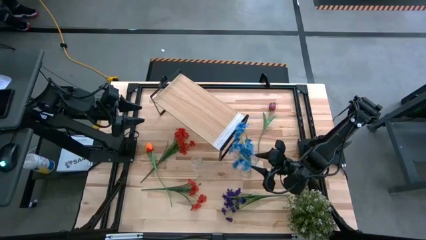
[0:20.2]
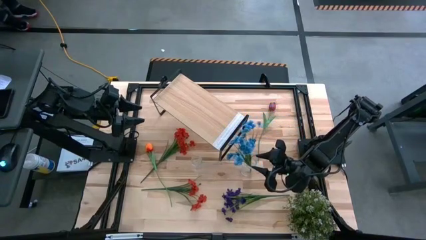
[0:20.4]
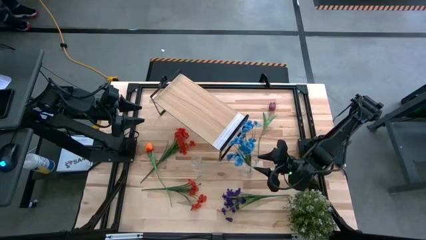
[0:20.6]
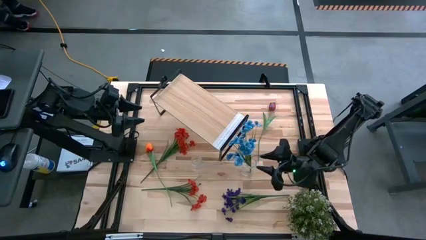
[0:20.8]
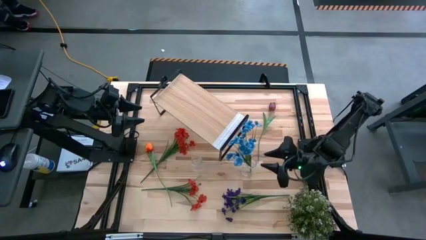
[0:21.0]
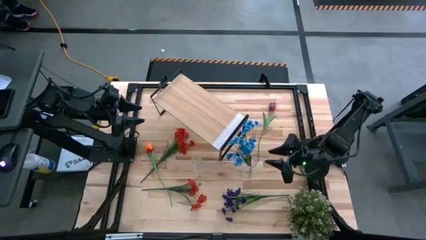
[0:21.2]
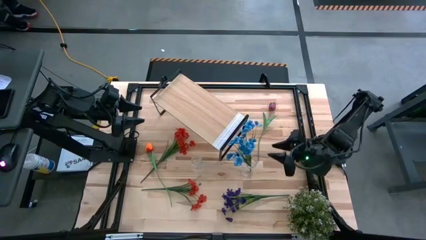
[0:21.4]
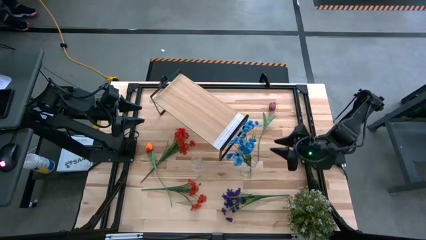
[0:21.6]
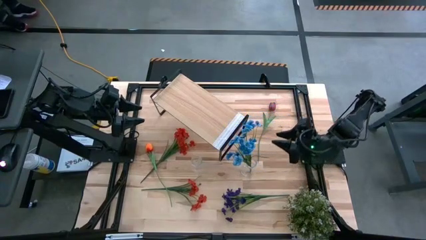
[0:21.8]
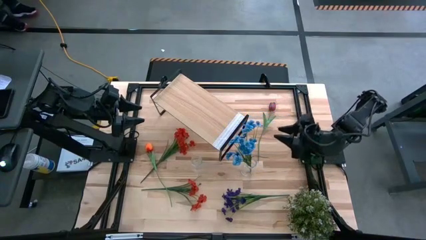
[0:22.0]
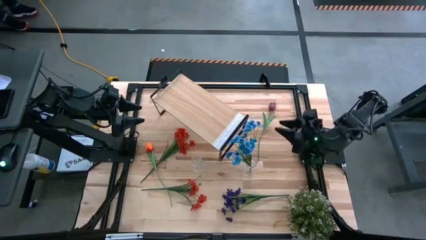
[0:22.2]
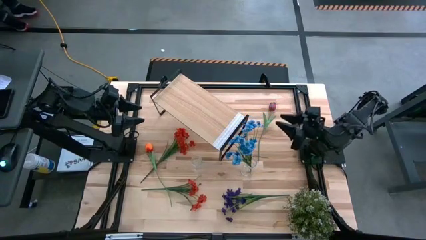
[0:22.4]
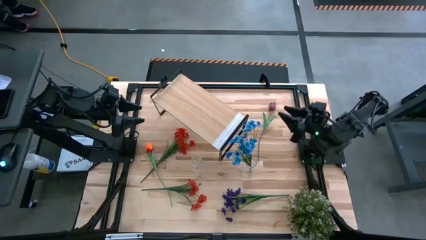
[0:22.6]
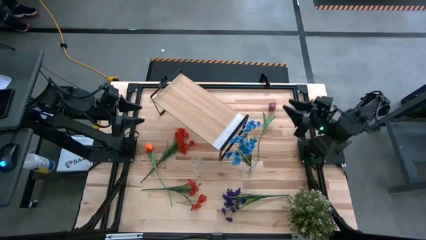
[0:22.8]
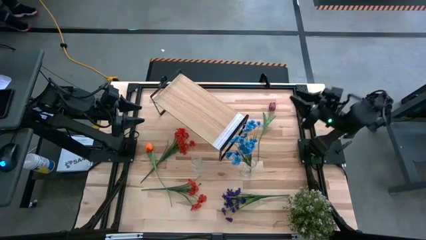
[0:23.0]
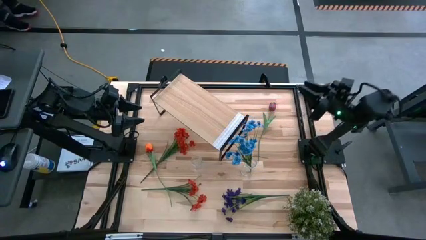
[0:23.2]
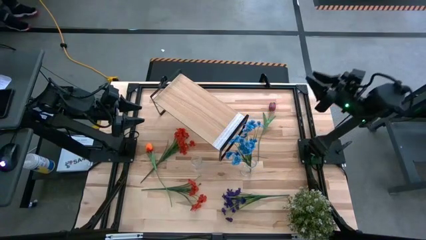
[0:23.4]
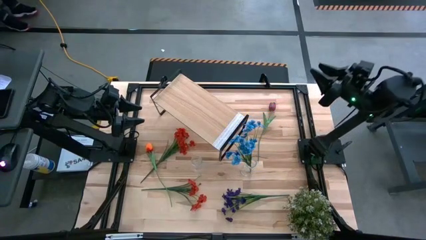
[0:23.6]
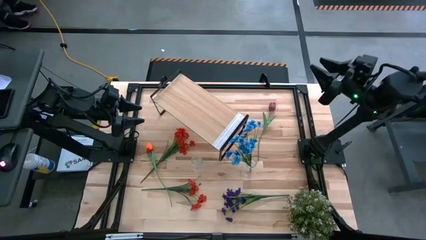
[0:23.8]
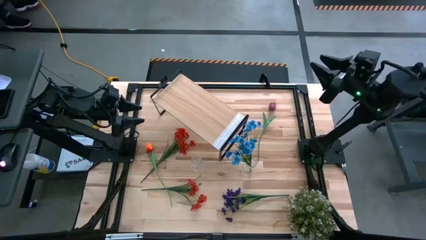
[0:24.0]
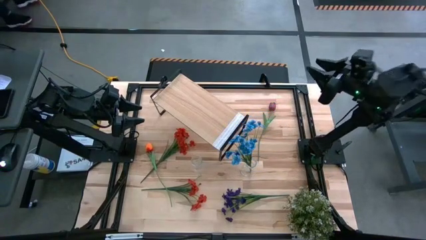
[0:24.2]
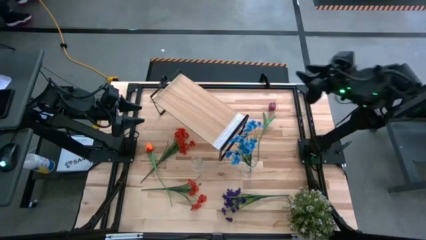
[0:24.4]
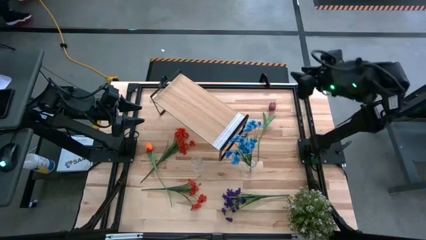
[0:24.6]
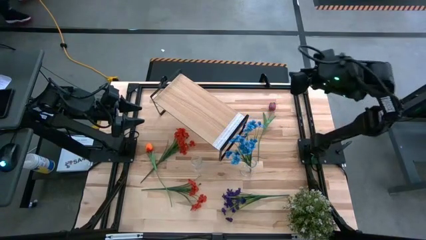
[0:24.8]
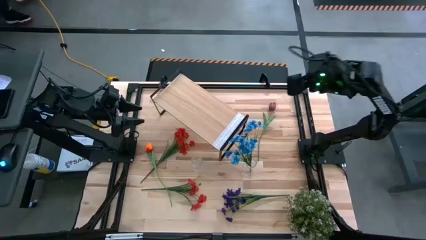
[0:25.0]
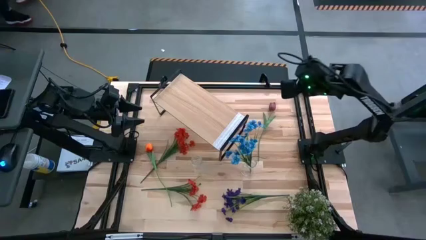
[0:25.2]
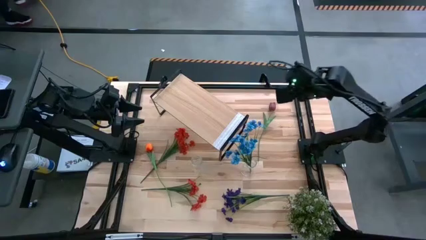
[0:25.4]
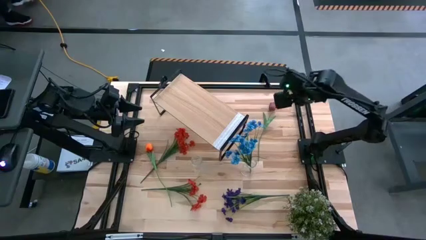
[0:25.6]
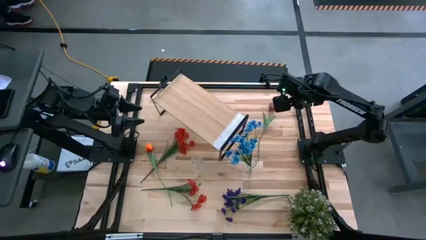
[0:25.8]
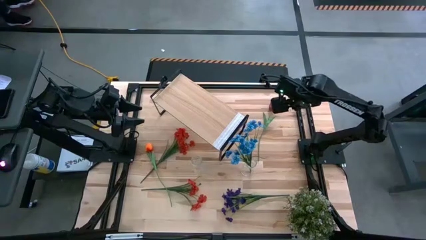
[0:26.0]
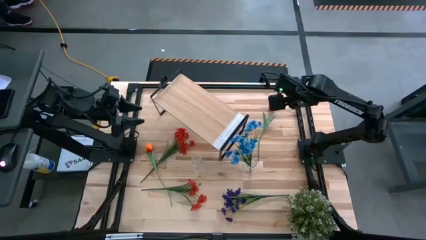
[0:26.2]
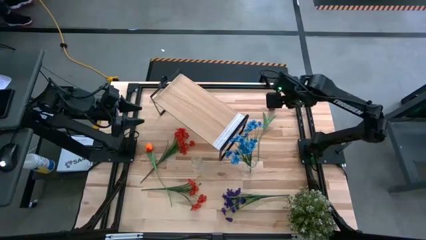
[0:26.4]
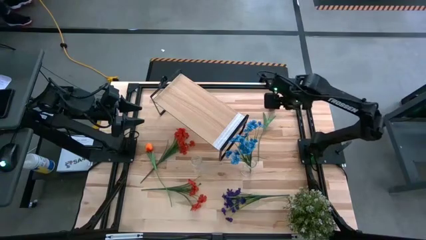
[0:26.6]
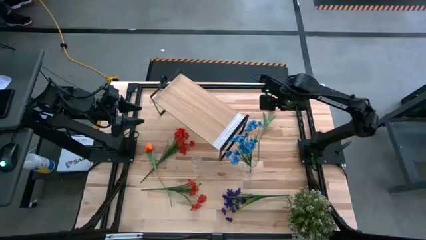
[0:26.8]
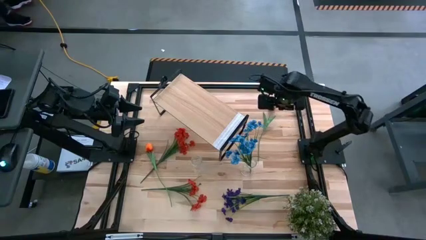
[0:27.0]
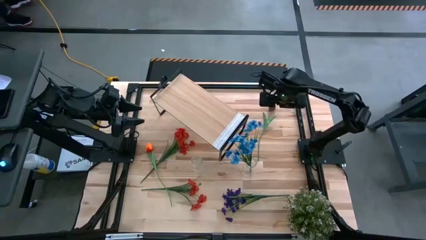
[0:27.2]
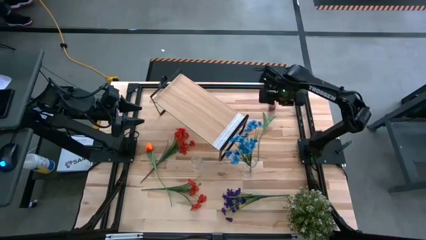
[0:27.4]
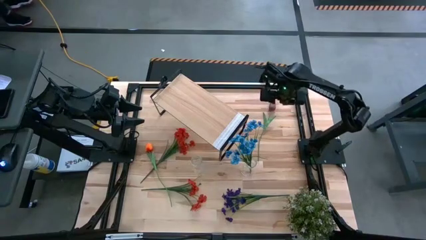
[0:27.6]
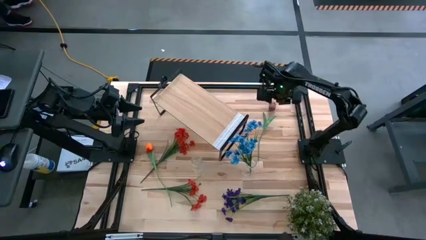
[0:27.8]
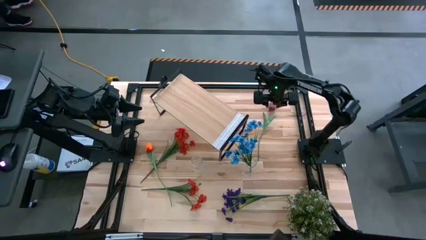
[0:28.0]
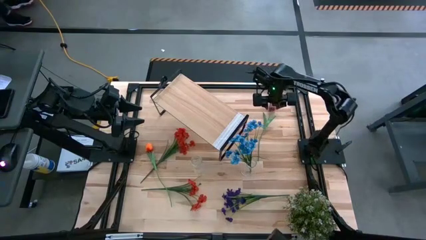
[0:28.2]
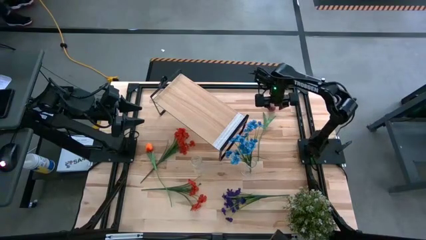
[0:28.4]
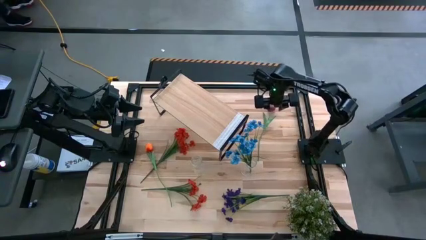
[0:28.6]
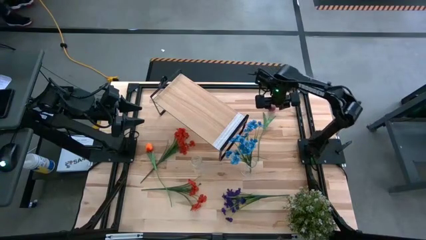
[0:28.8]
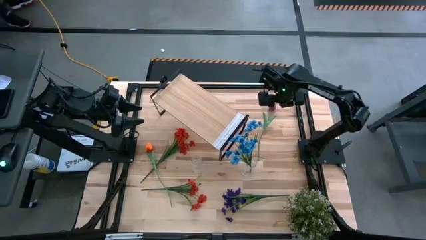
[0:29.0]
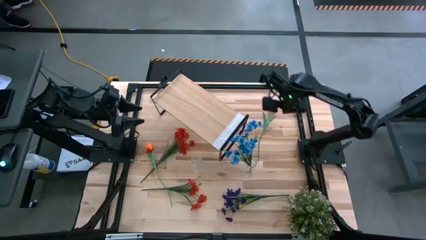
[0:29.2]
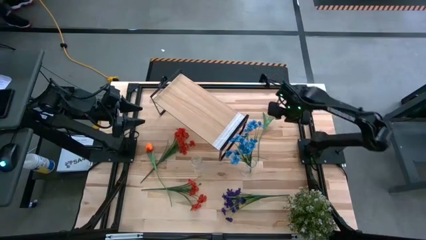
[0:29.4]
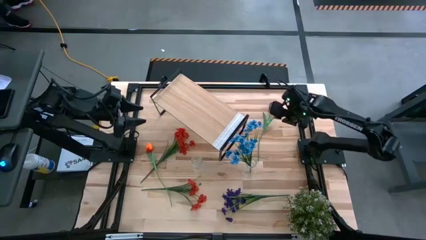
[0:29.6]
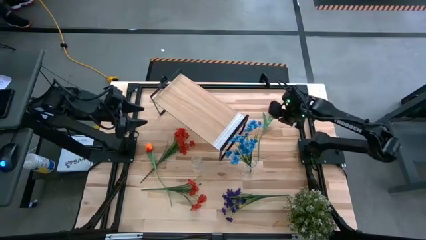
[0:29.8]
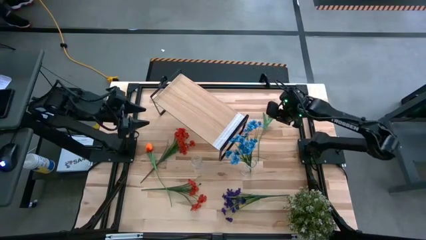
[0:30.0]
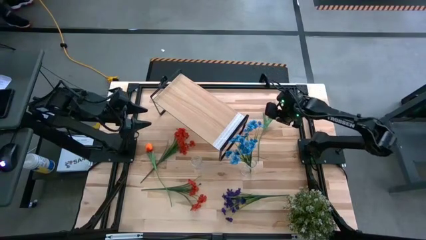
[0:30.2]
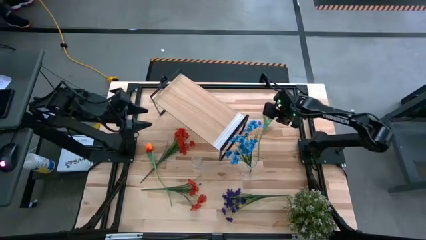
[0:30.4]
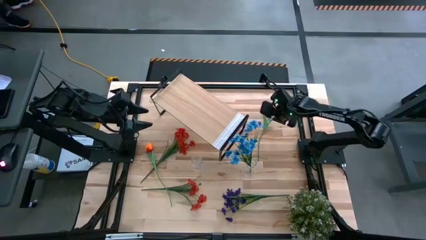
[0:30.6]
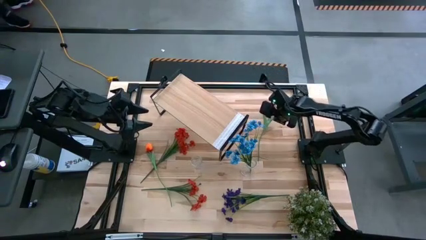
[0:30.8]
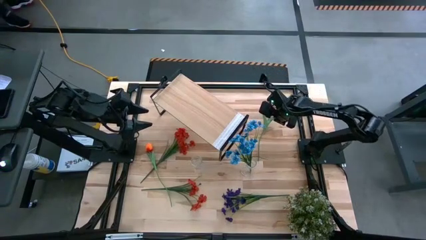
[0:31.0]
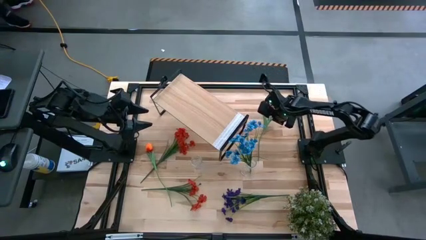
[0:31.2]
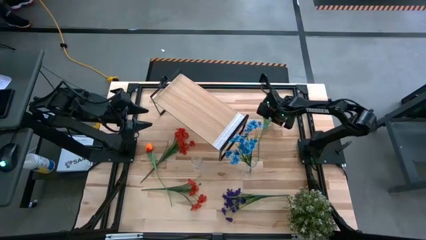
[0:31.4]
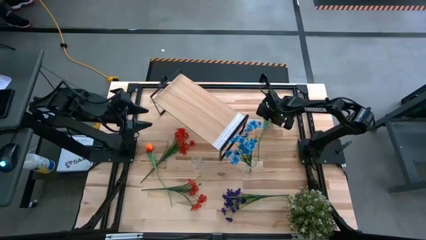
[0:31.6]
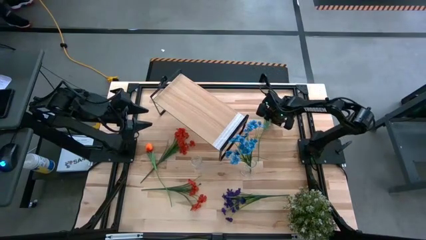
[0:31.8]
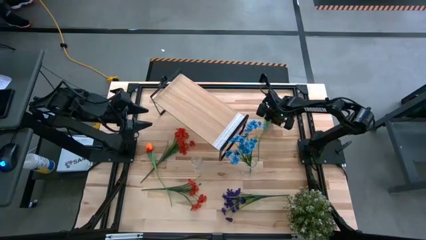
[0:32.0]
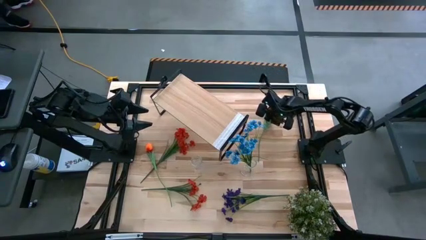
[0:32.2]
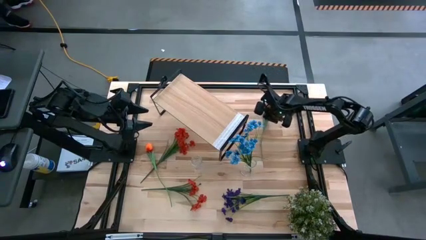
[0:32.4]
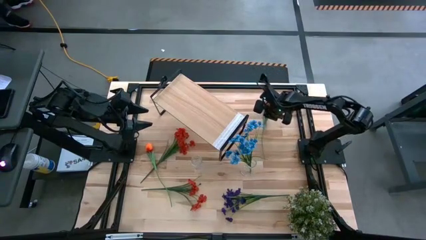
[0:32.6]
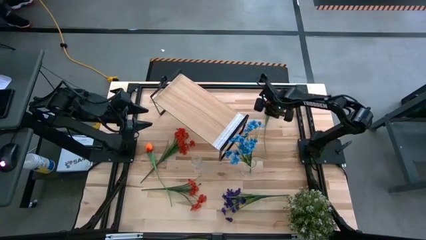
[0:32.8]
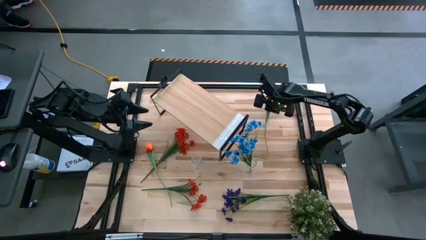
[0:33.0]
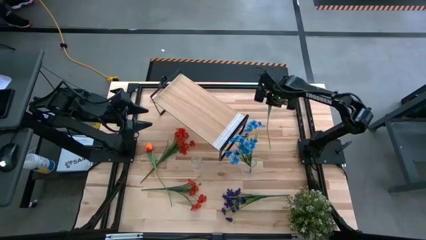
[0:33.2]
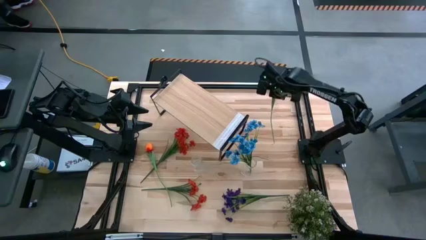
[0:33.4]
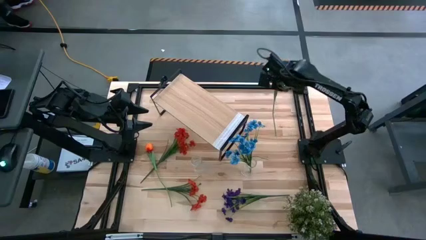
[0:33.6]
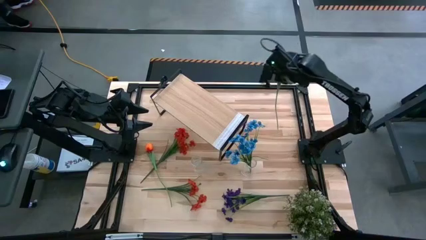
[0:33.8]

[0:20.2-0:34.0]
Task: Pick and place flowers into a vace then onto a shelf
Put the pink flower into the right transparent vase

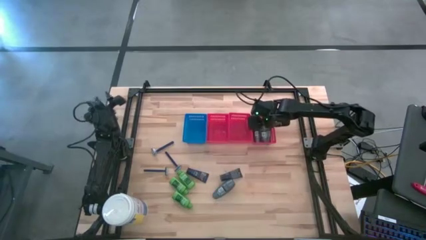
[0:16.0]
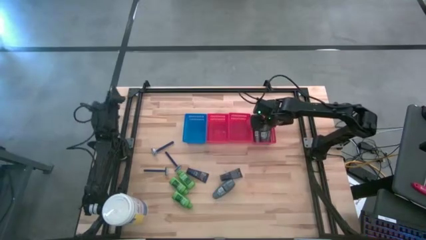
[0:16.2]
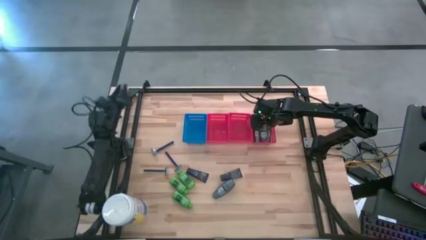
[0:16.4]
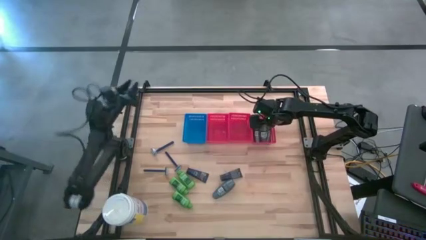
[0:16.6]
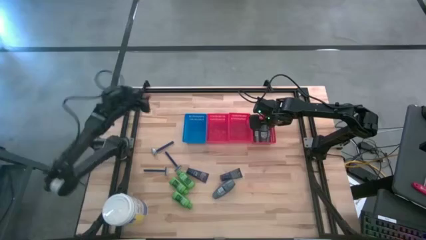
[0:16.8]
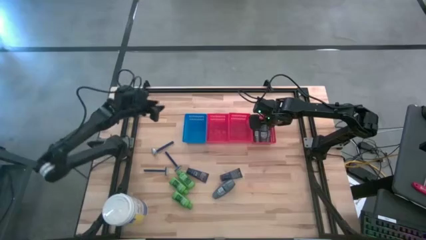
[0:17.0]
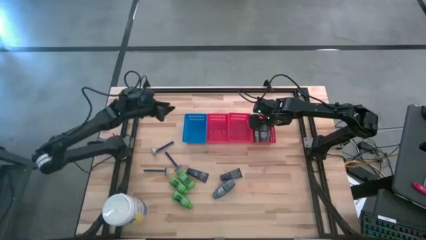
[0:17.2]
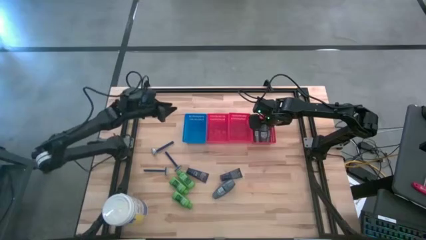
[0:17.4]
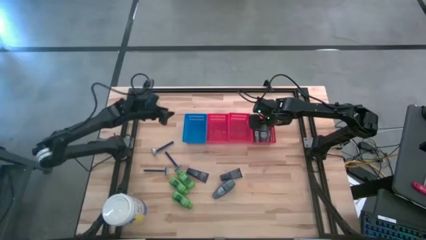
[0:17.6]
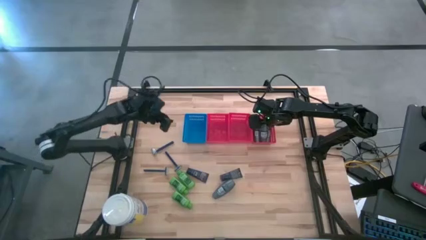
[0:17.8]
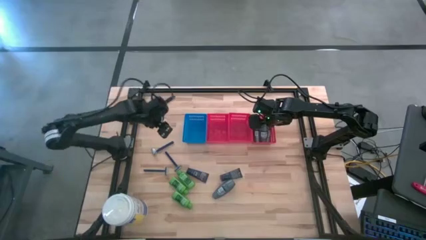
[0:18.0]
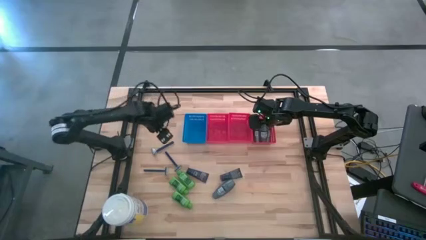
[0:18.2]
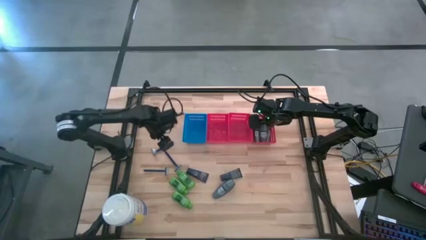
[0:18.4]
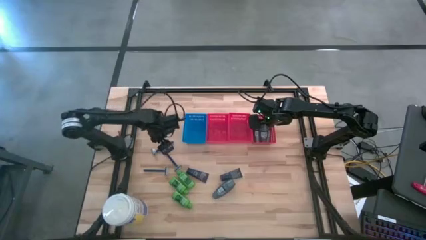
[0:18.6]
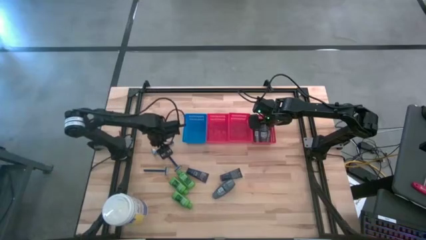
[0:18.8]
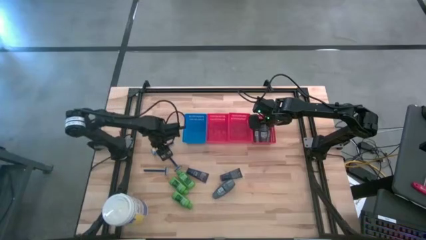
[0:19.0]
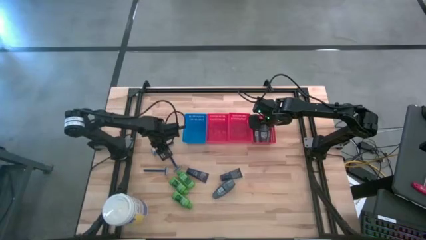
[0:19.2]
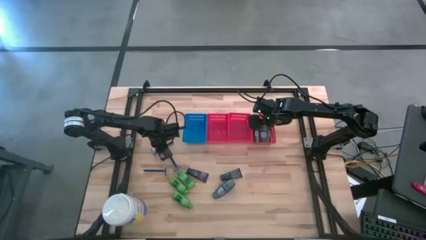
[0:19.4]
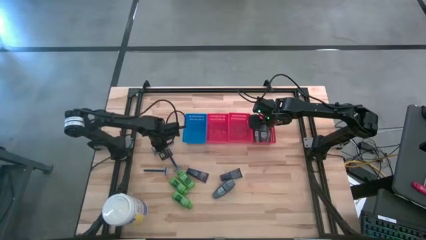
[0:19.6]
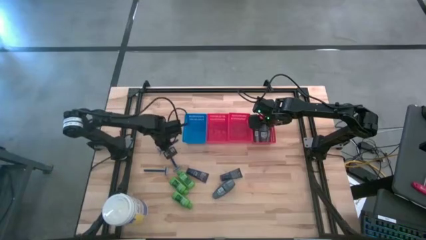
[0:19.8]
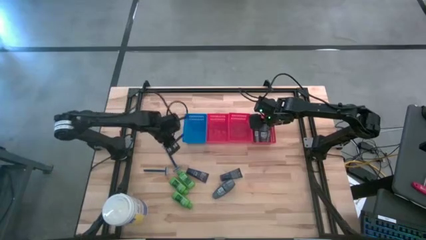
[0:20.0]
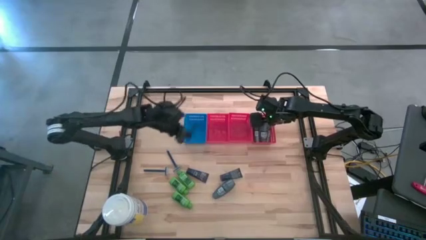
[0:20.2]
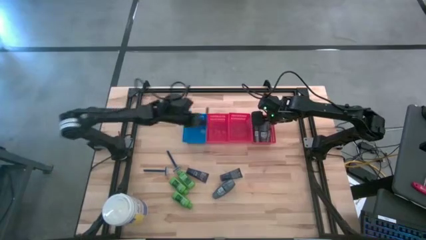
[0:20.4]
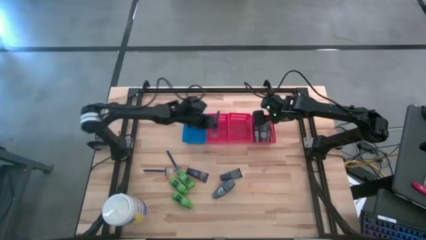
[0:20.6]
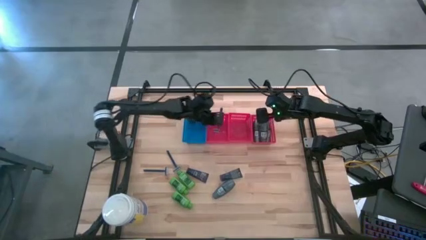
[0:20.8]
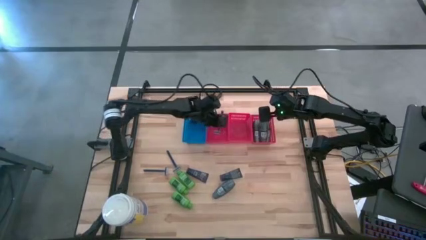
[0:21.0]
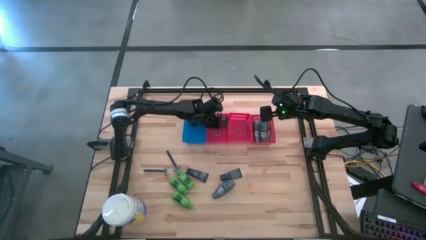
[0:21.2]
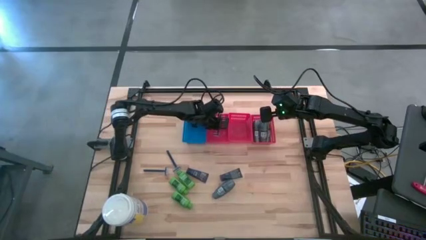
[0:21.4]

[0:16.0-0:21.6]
Task: Pick & Place Travel size toiletries
Put the blue razor into the left red bin
